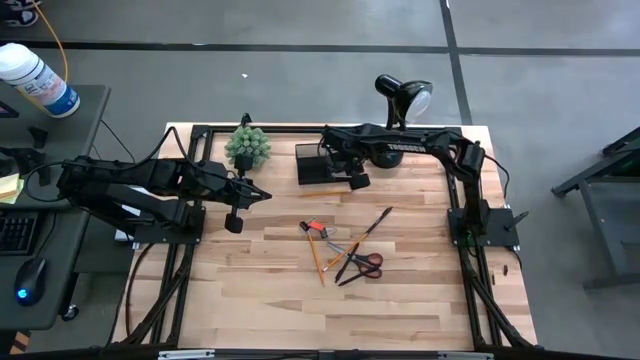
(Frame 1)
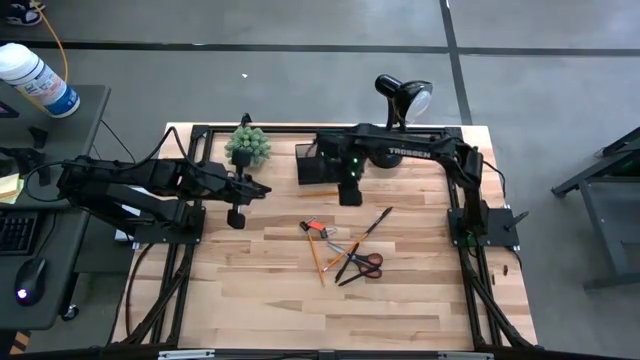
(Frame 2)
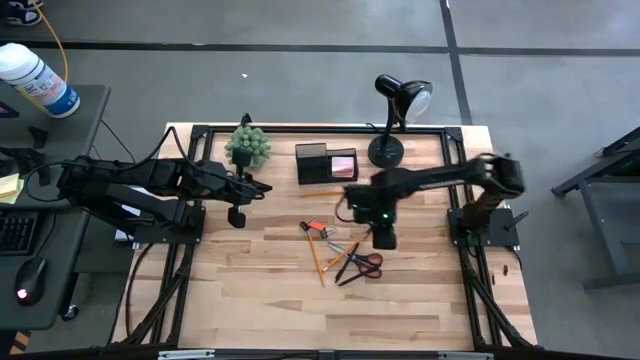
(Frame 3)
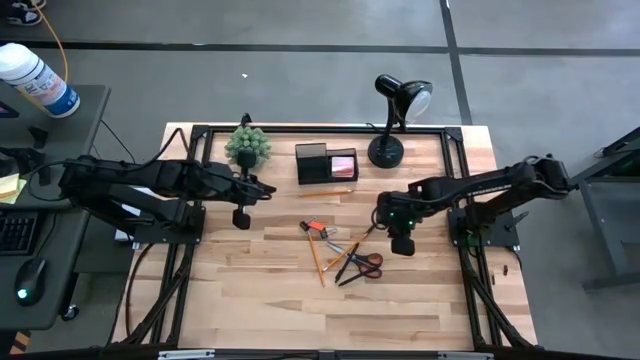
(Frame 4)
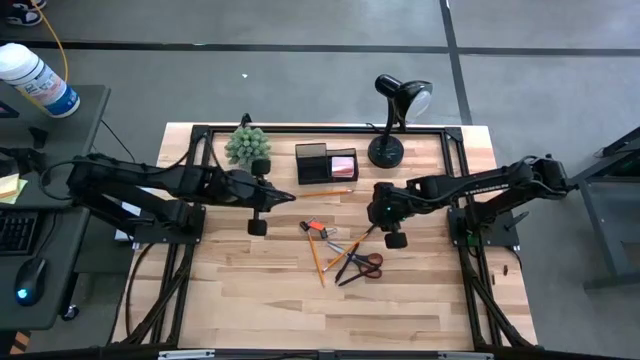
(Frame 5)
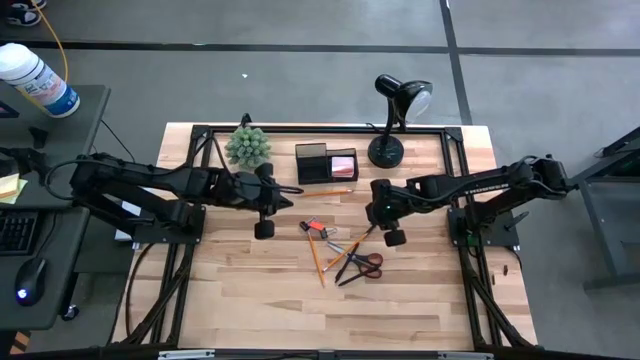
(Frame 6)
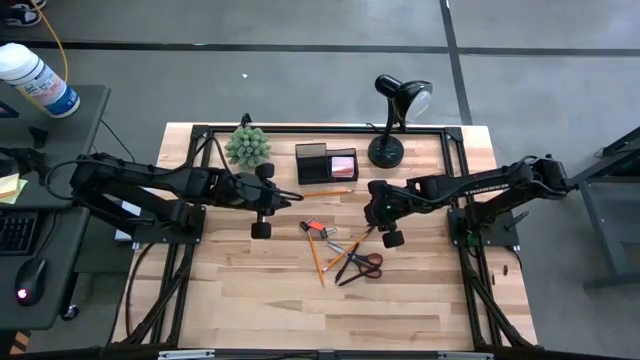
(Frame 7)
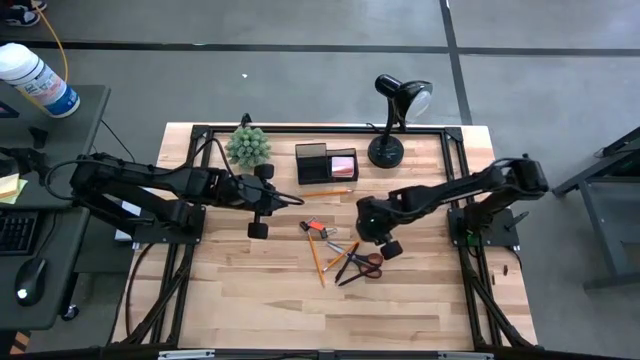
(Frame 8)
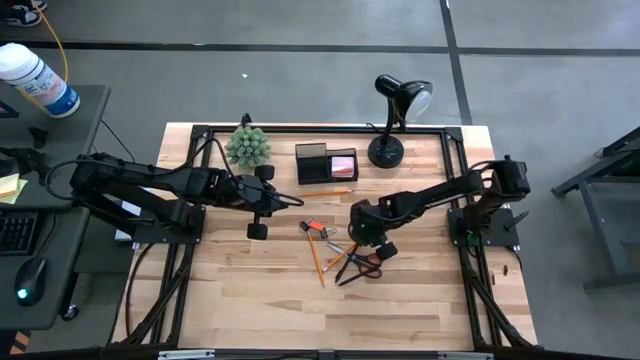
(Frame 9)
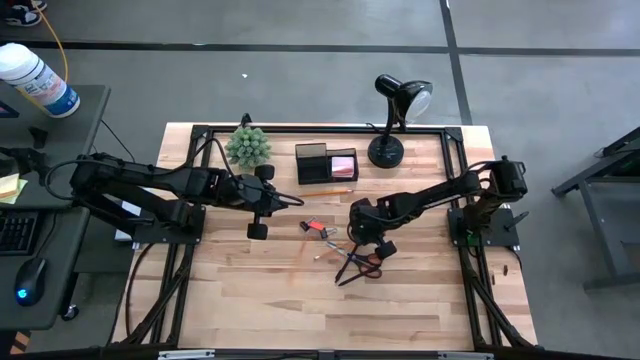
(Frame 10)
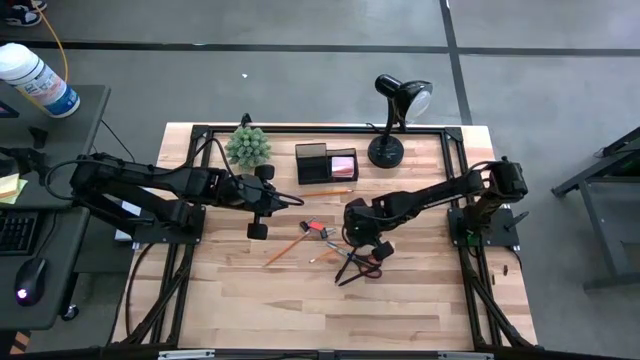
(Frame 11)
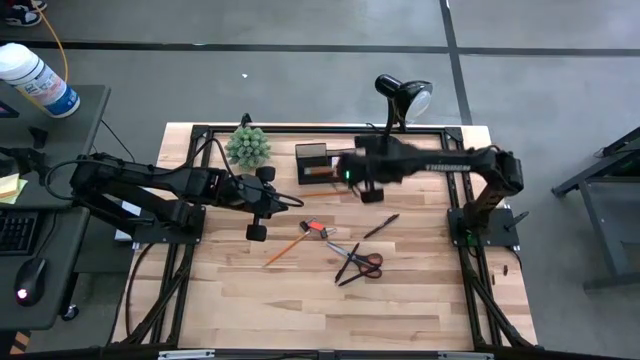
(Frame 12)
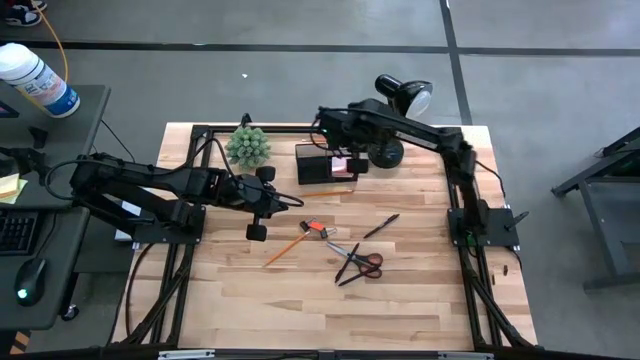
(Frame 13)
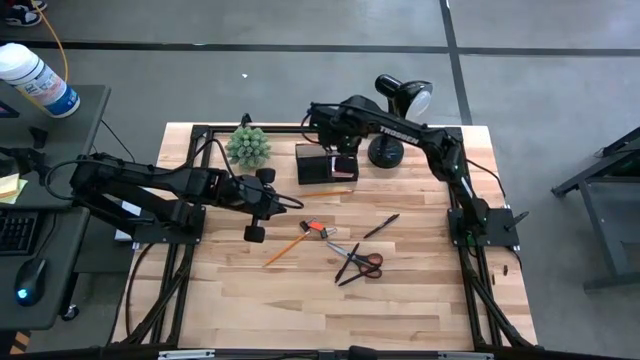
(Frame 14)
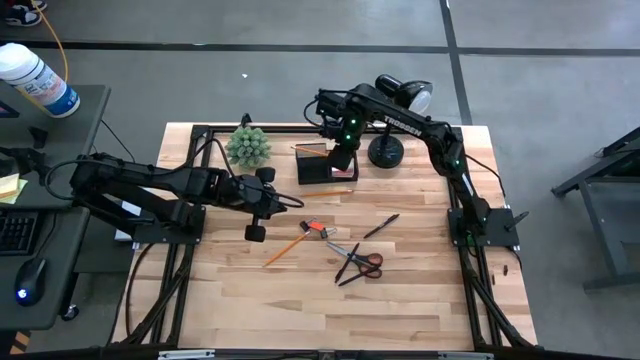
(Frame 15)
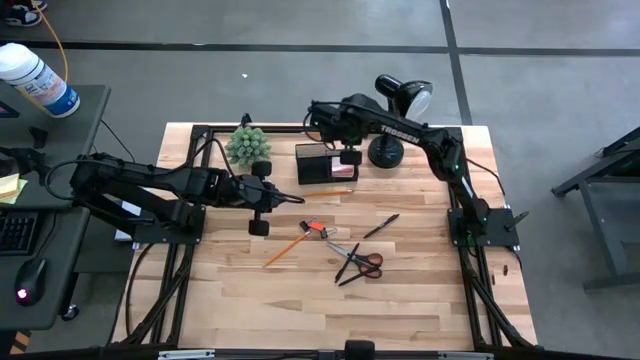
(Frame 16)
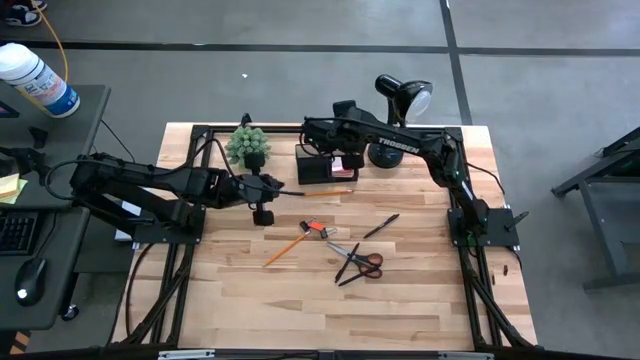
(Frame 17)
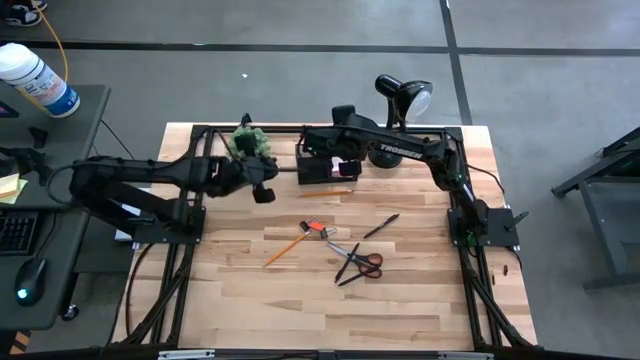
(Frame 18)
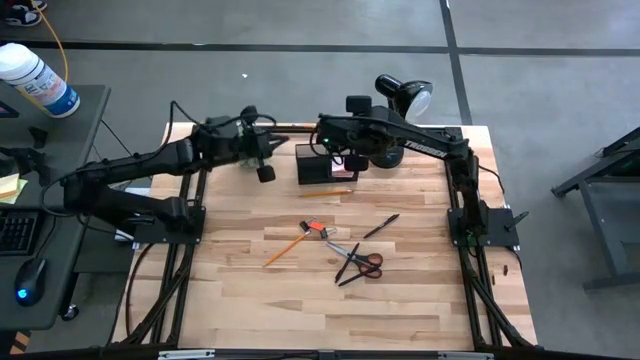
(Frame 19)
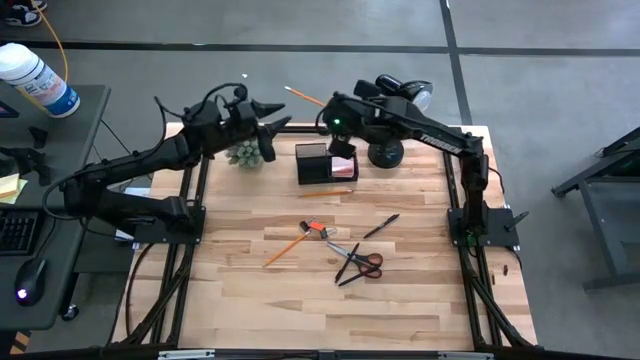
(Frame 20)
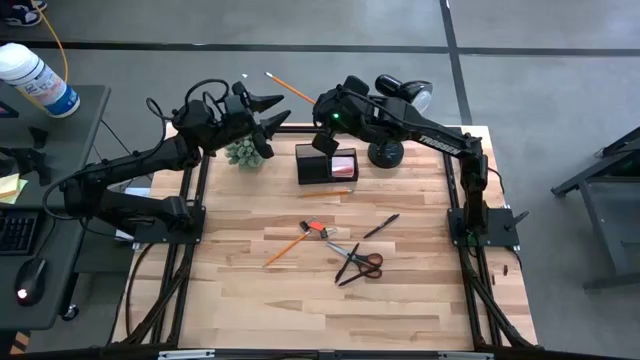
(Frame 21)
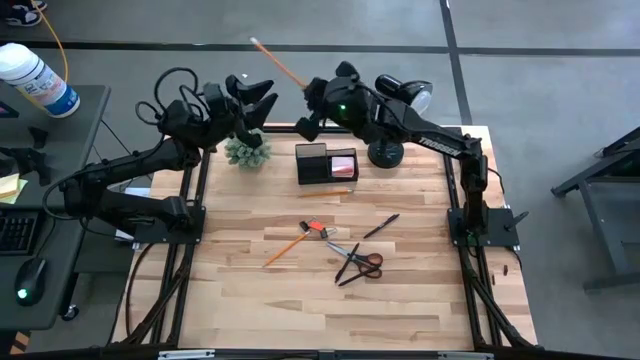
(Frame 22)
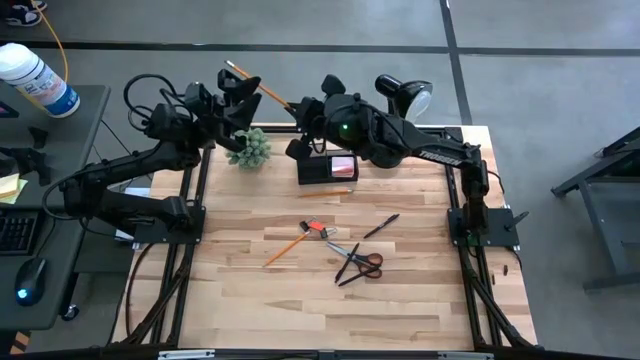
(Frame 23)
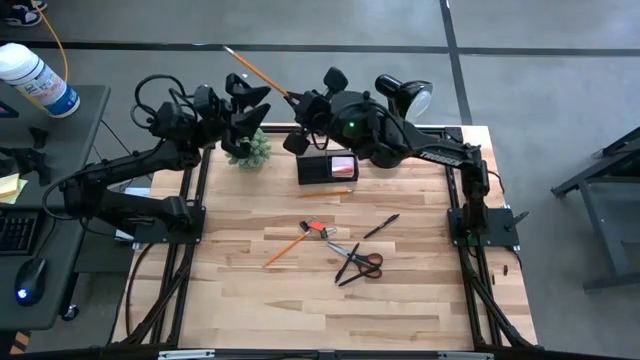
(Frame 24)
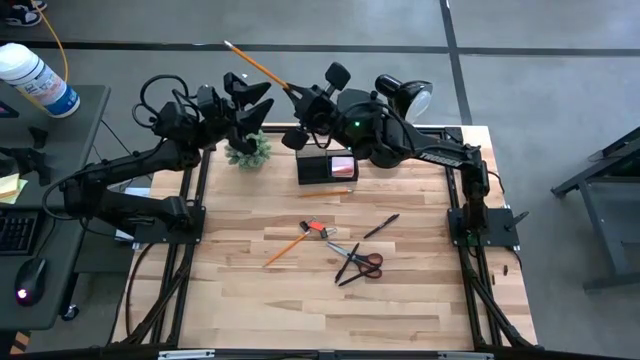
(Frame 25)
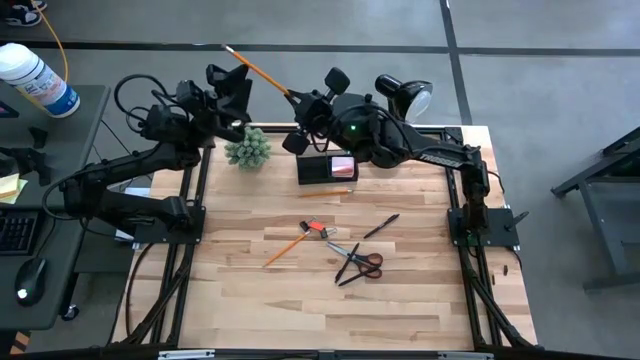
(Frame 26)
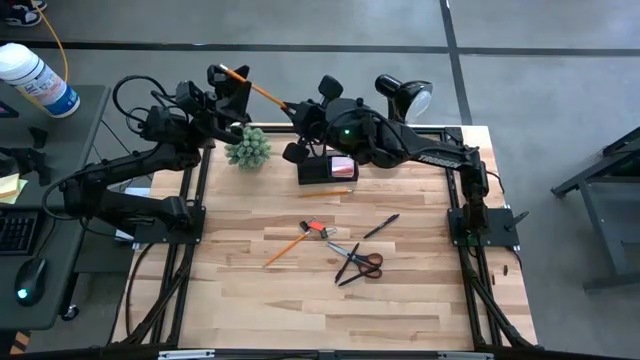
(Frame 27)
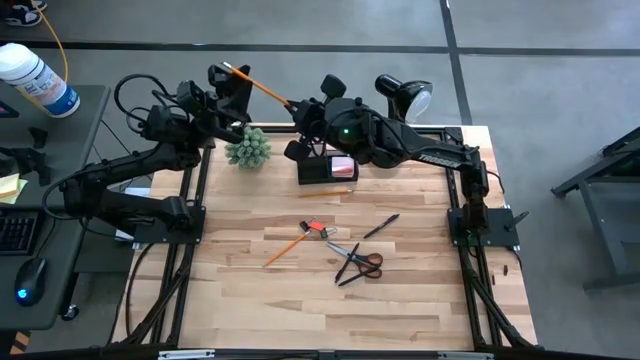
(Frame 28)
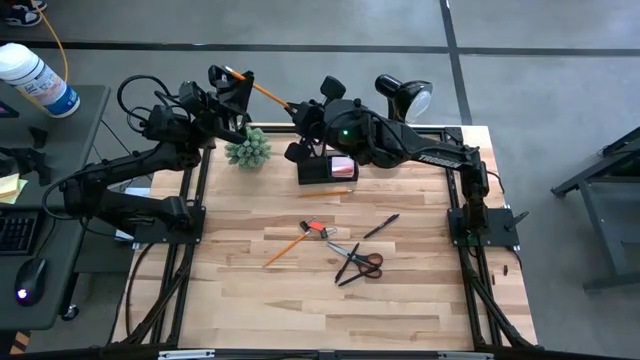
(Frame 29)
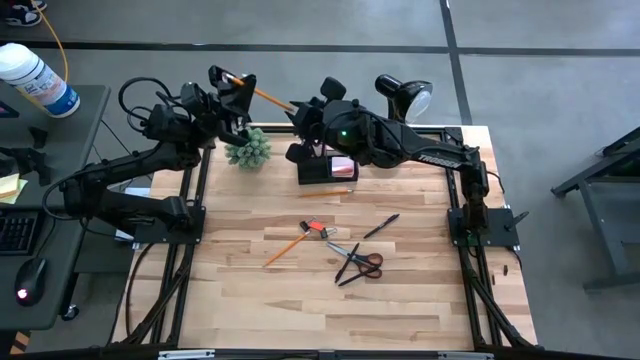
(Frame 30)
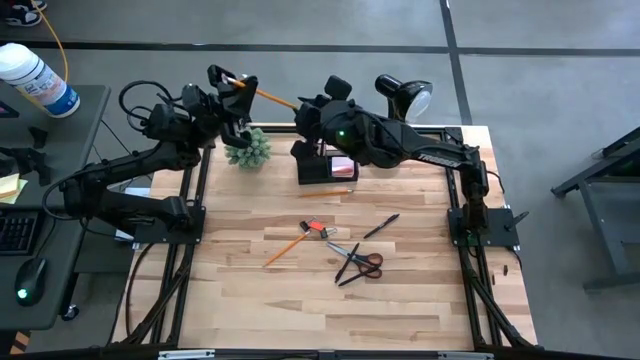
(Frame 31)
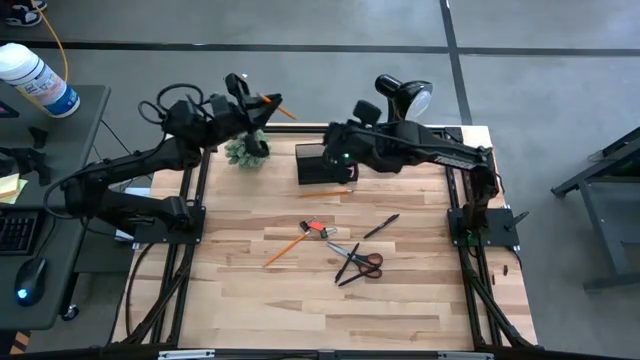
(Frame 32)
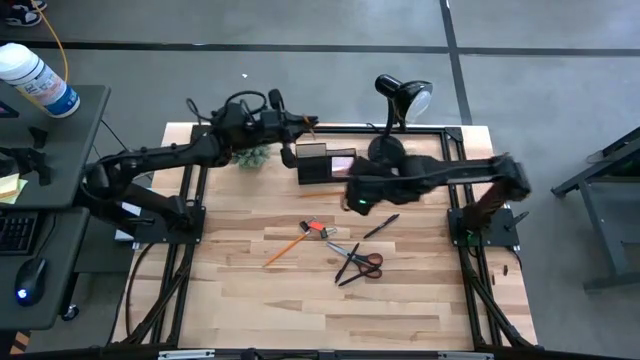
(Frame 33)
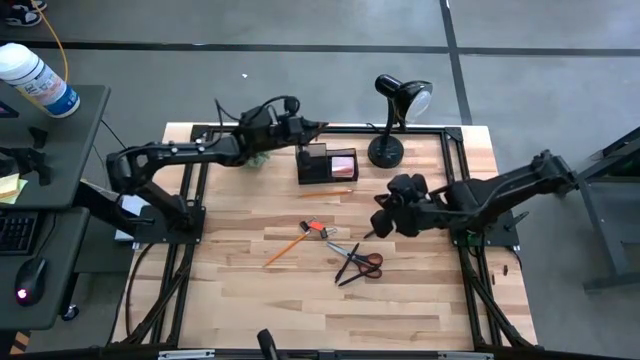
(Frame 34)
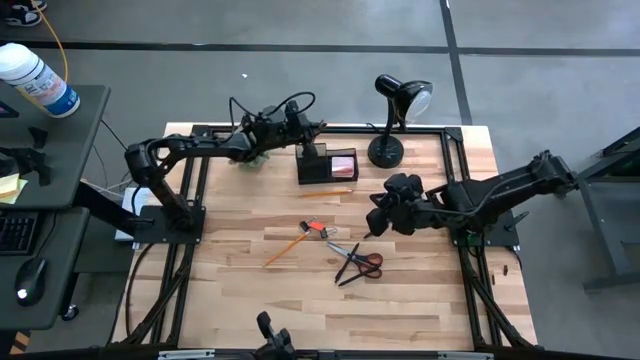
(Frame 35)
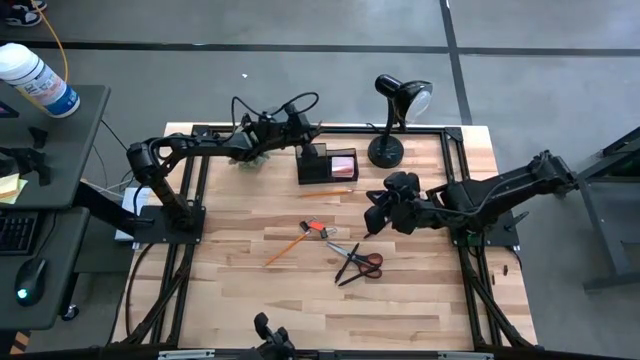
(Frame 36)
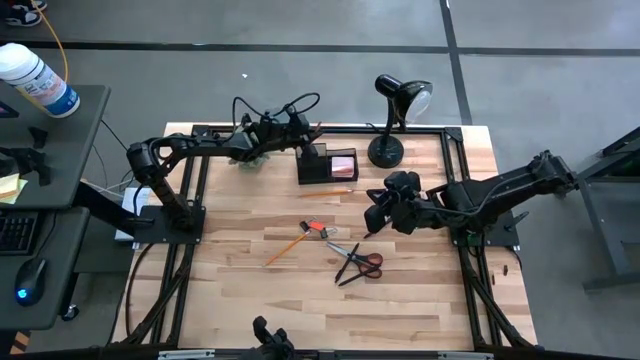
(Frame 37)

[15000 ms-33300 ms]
Task: Pick and place office supplies into organizer
Put the bottom right yellow pencil into the black desk organizer
